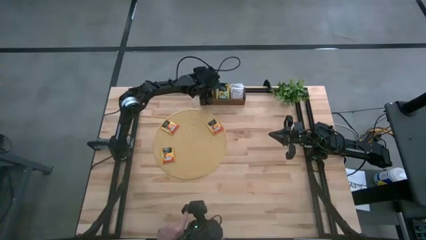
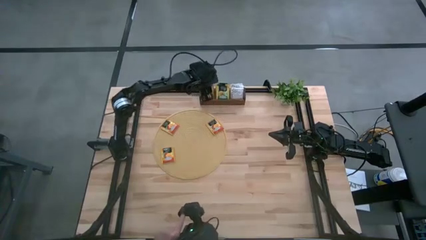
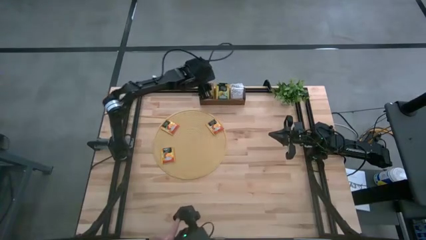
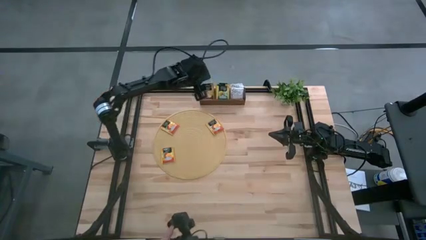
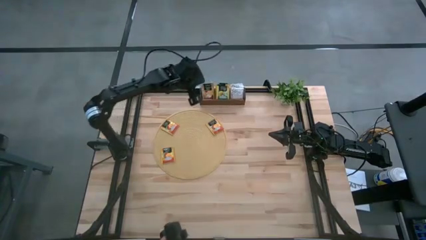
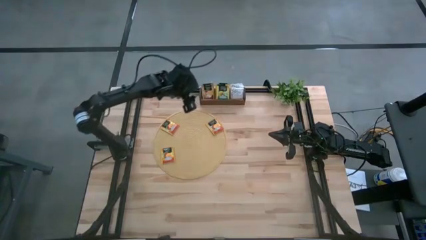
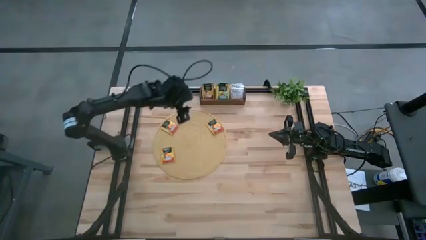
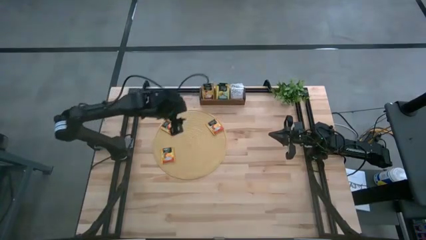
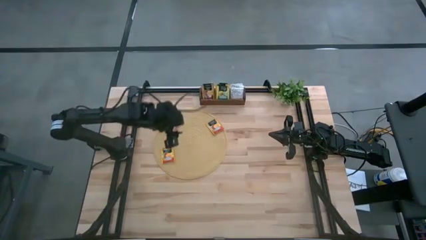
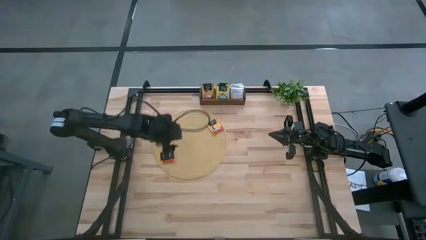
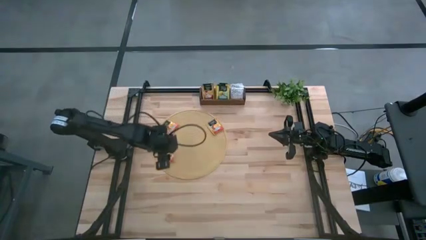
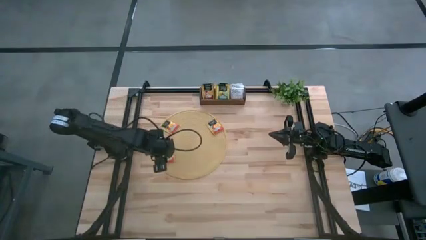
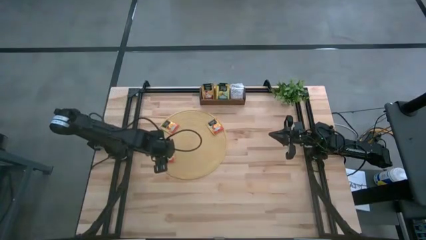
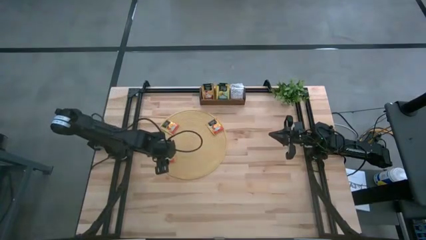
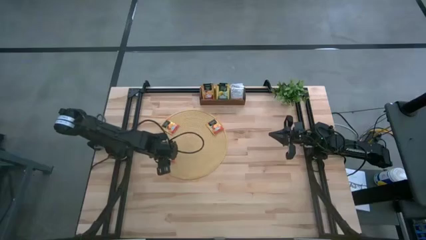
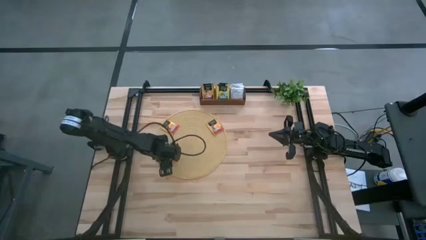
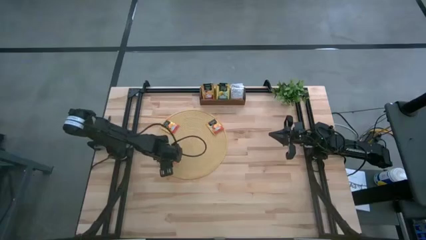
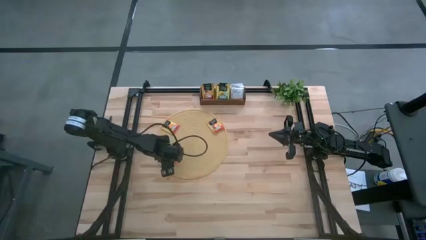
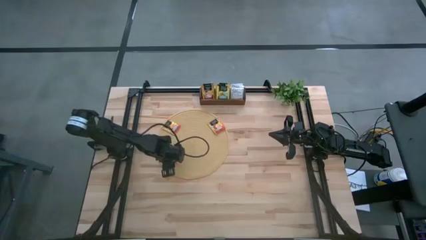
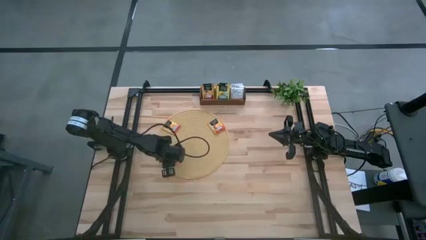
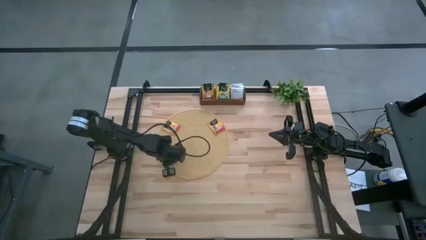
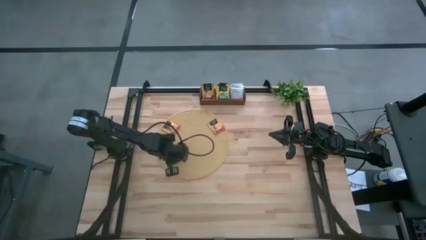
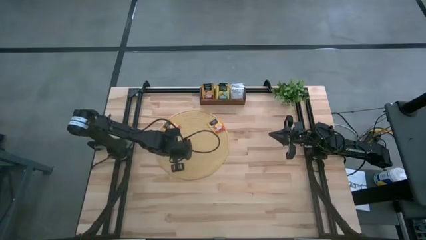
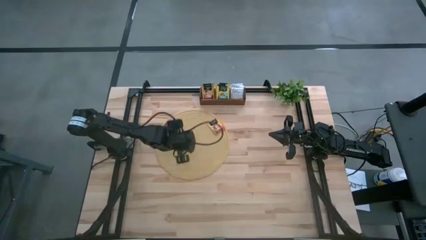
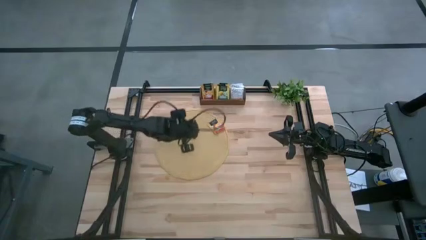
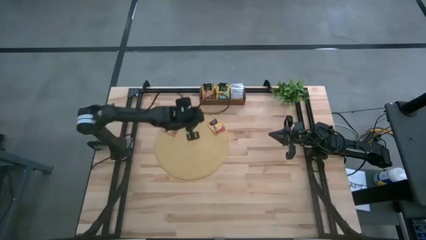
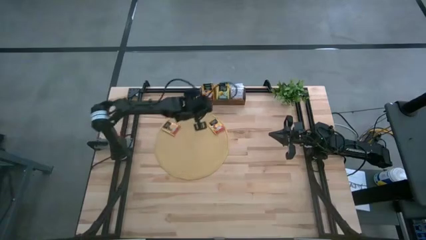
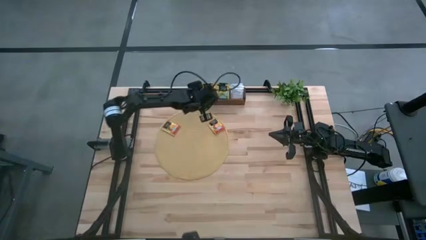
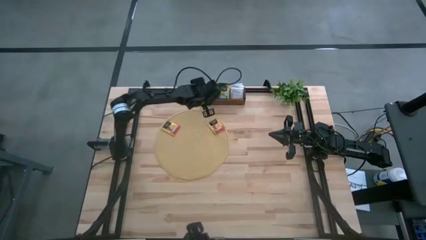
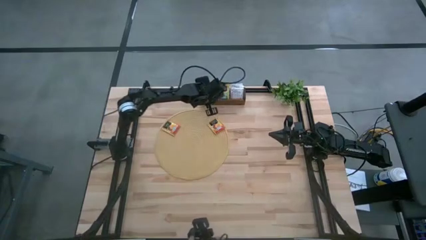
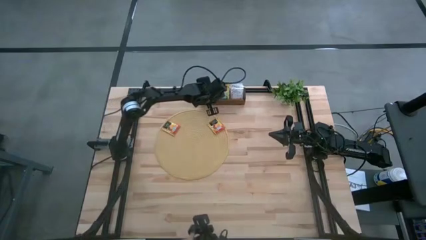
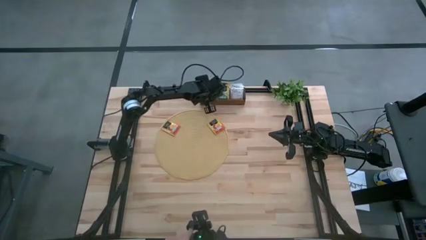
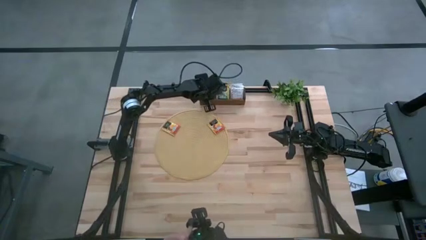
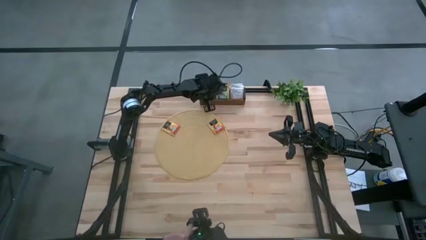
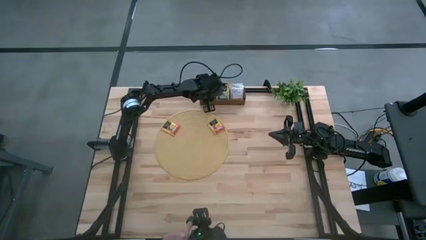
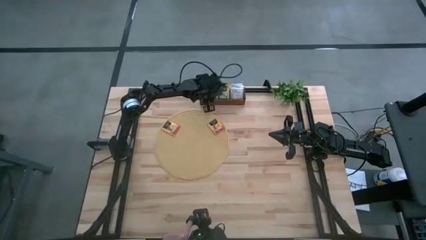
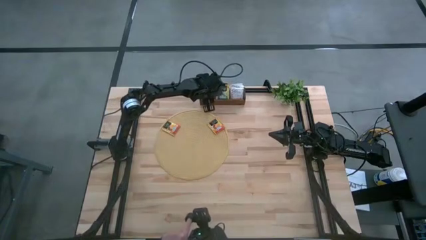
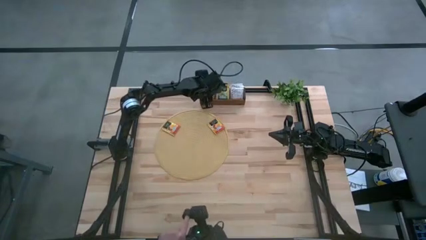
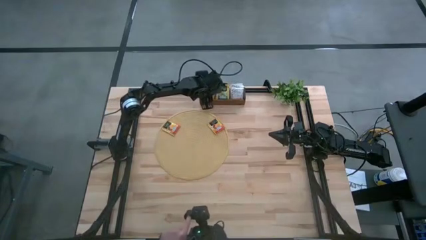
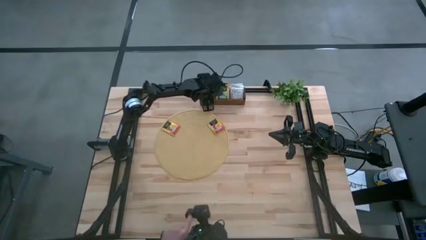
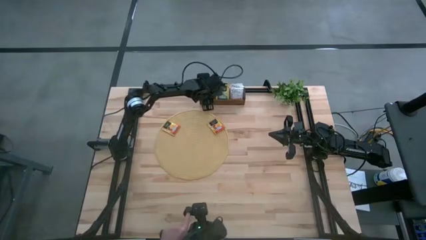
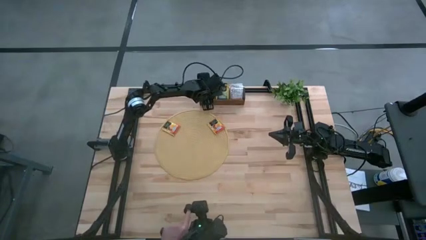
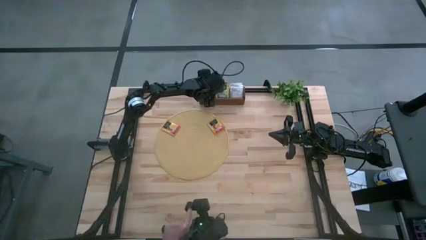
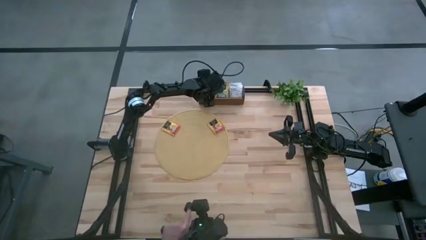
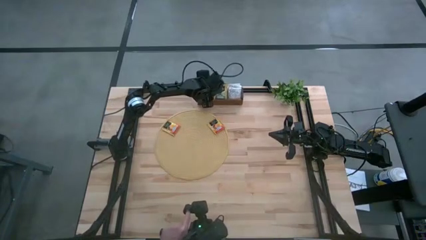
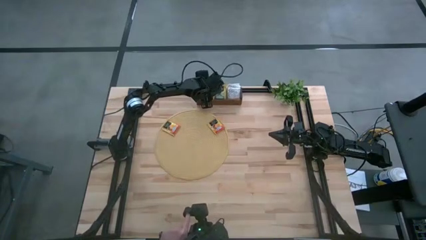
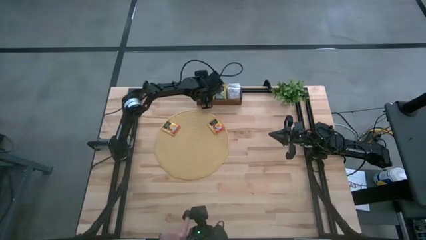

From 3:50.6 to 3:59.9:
Task: Pick & Place Tea
Put the bottom orange tea bag into the left section of the wooden organizer

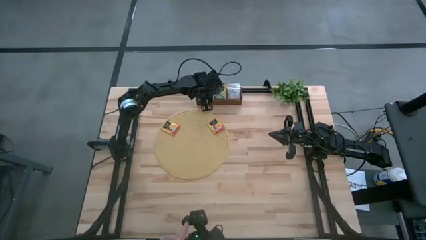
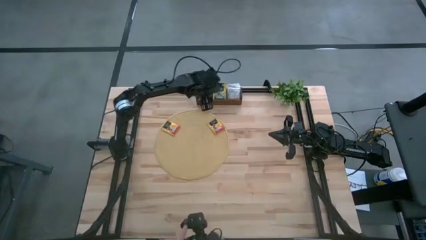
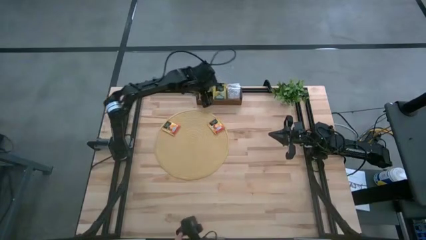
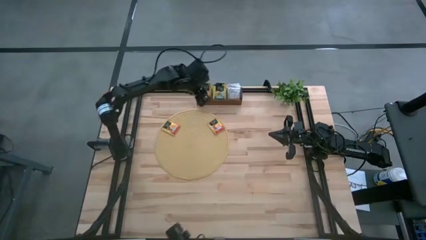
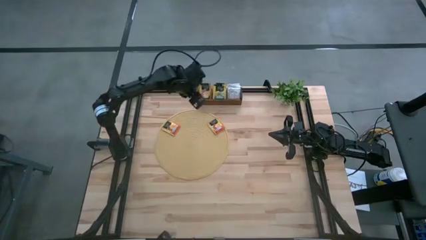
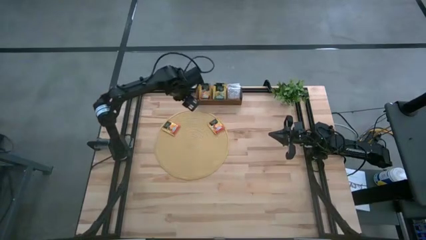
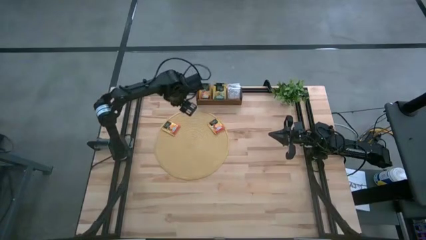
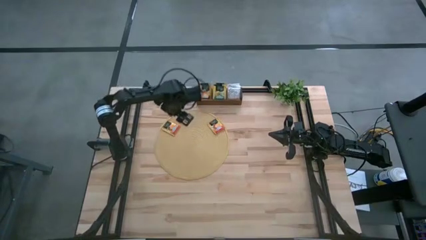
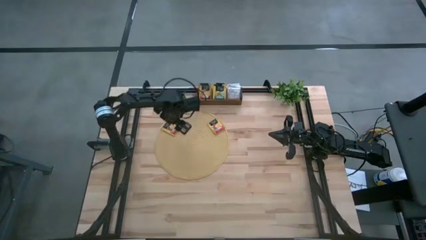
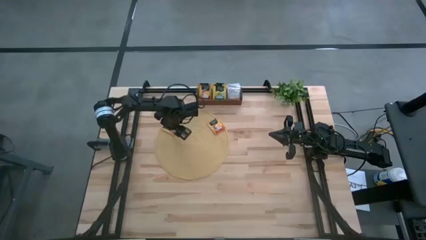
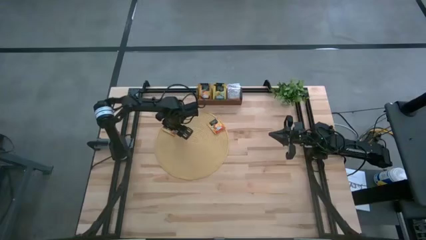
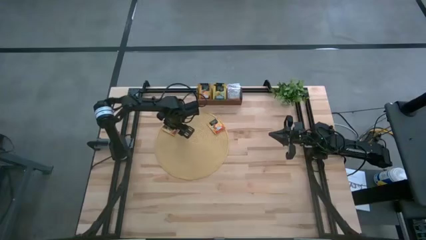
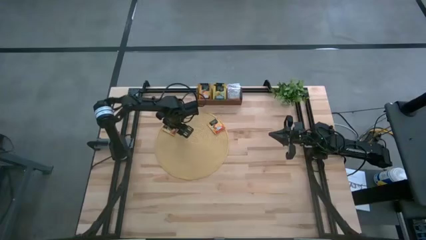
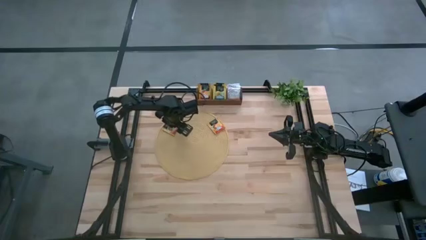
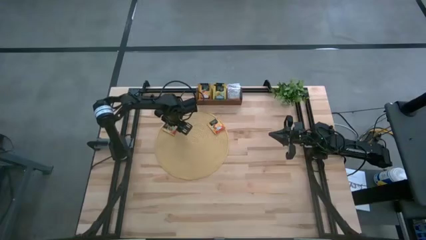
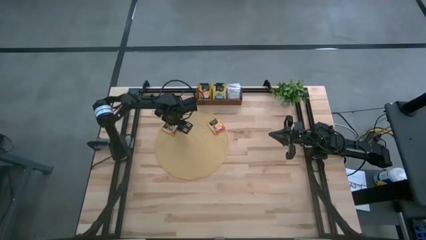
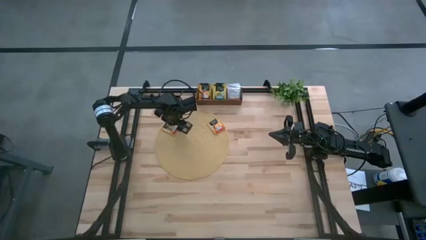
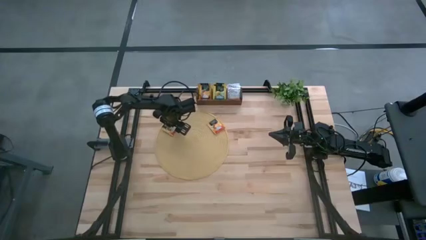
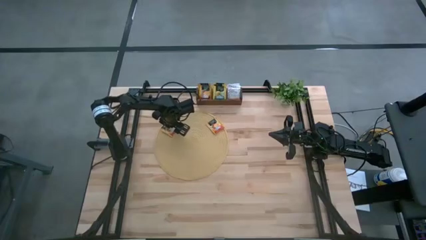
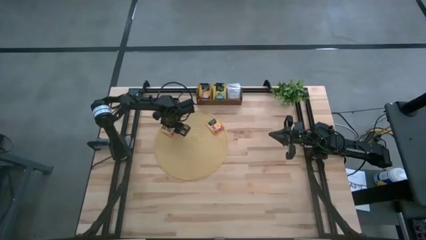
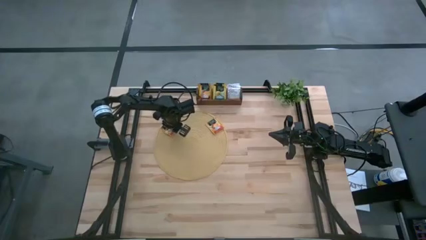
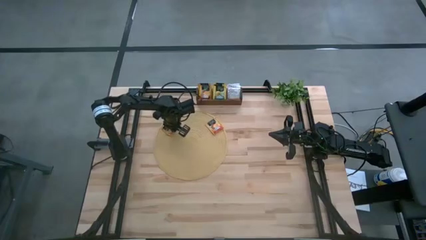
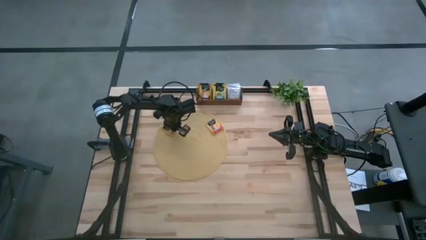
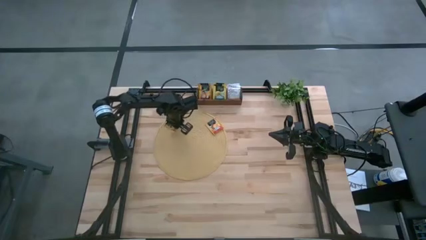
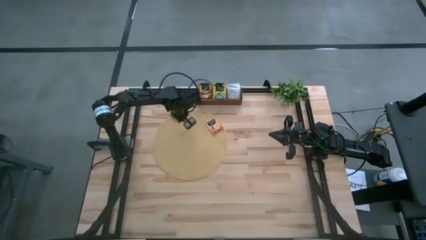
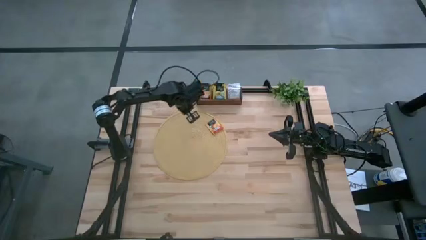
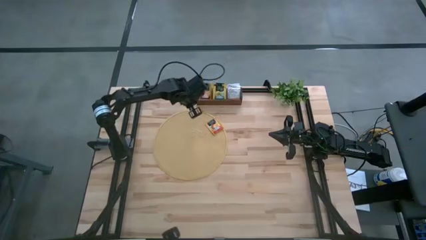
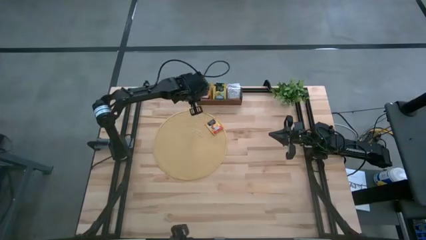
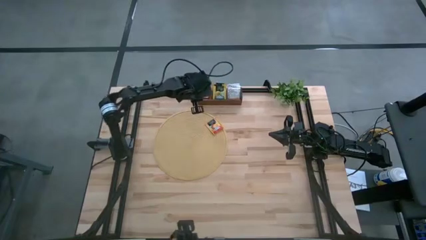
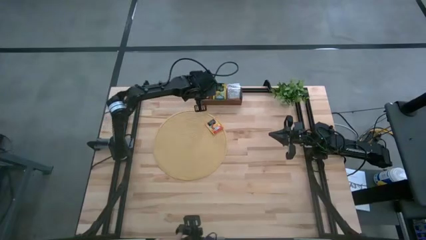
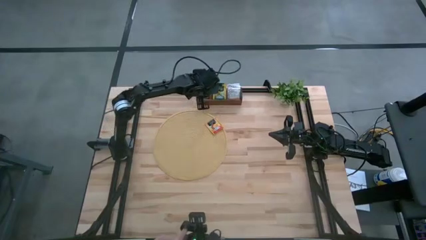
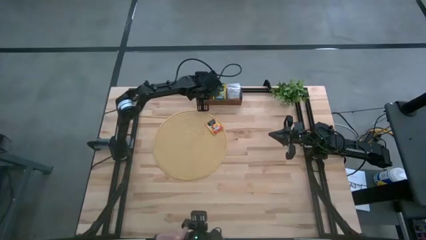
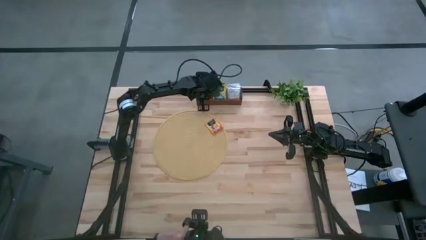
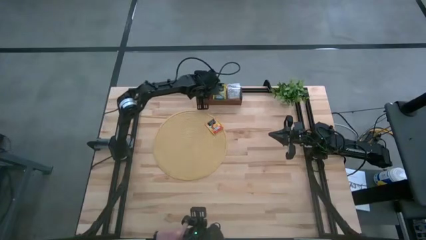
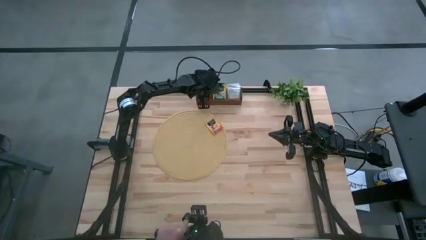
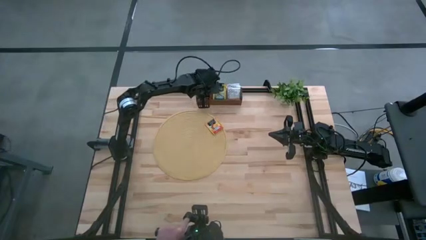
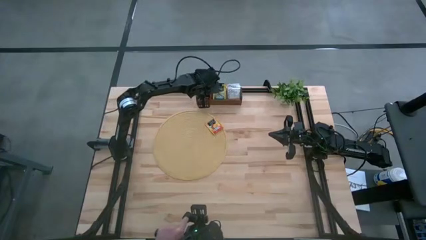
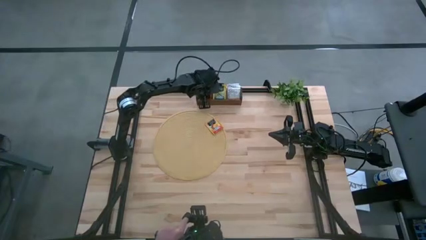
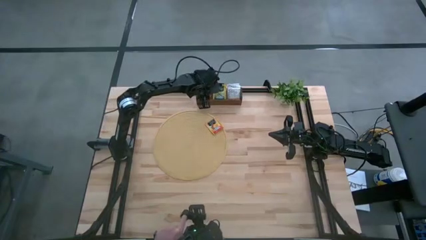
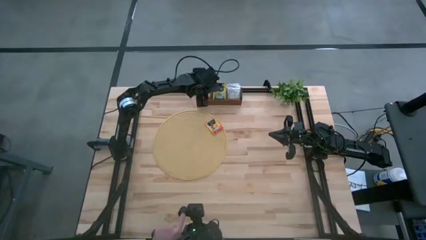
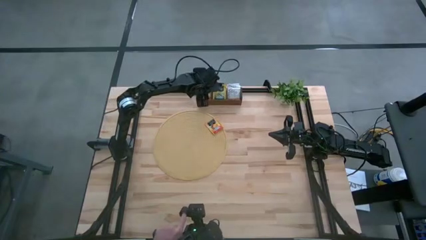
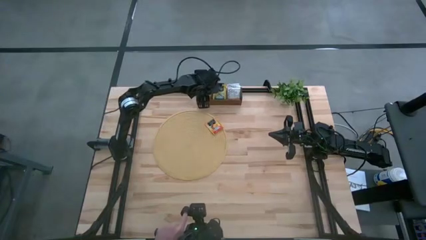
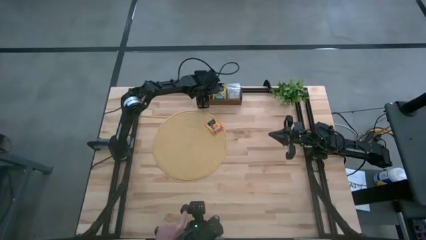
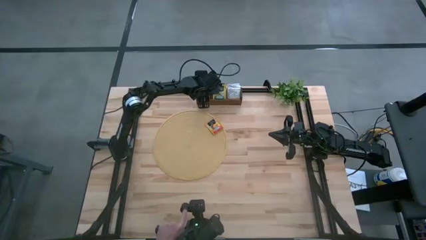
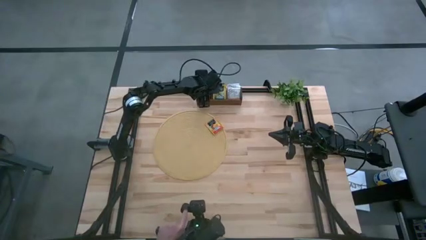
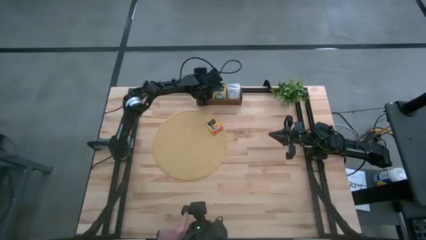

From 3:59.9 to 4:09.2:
Put the left orange tea bag into the left section of the wooden organizer
